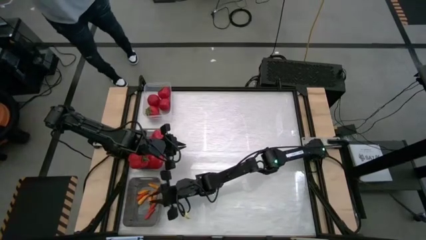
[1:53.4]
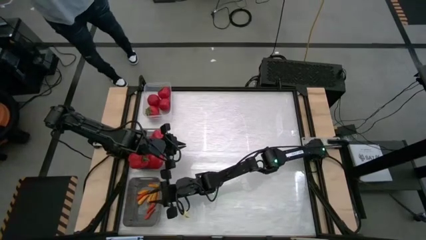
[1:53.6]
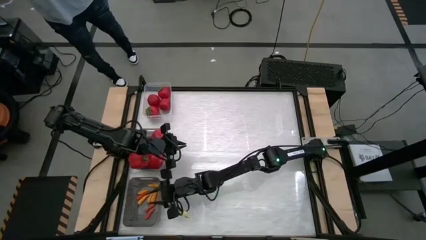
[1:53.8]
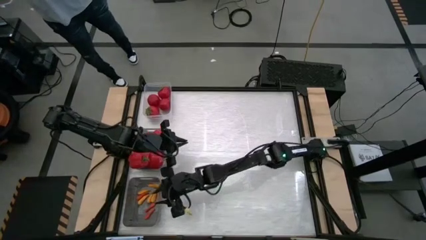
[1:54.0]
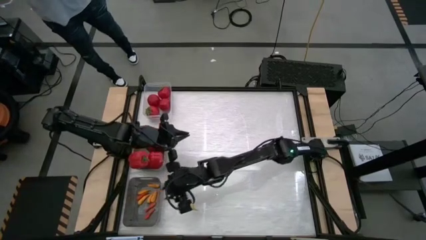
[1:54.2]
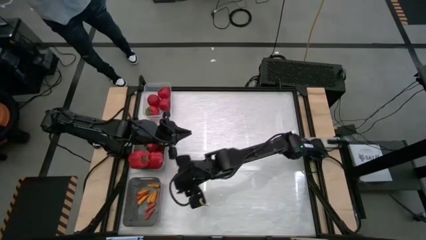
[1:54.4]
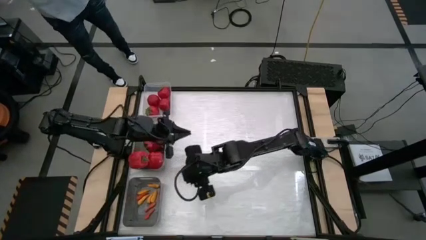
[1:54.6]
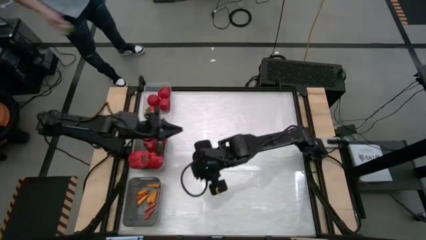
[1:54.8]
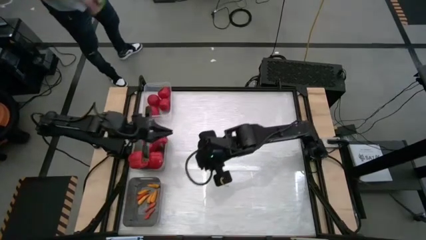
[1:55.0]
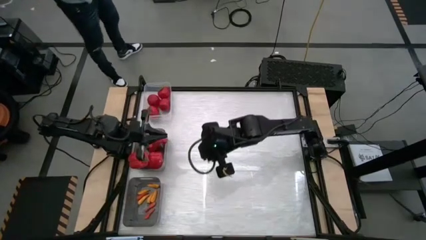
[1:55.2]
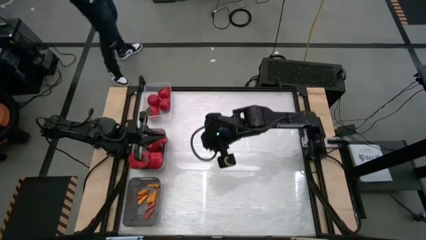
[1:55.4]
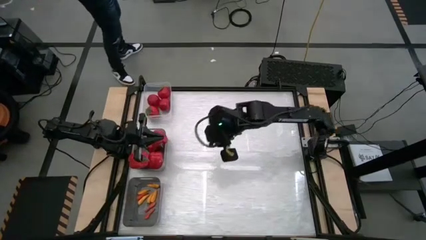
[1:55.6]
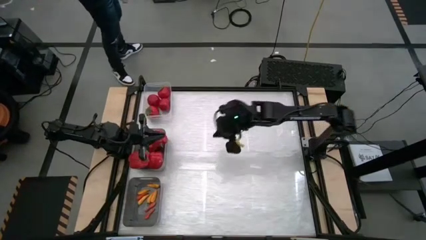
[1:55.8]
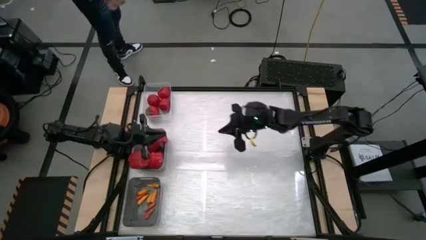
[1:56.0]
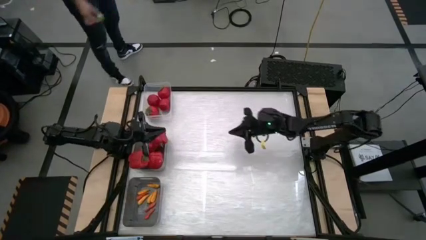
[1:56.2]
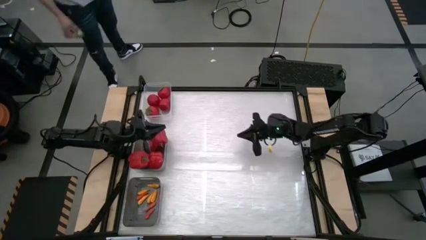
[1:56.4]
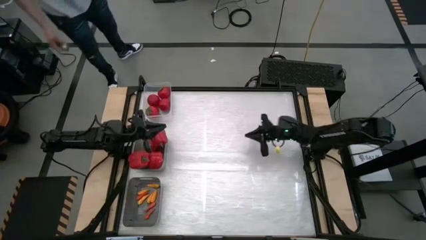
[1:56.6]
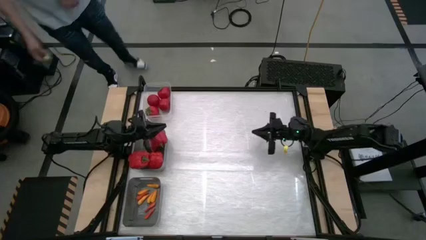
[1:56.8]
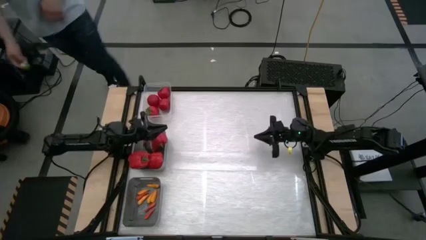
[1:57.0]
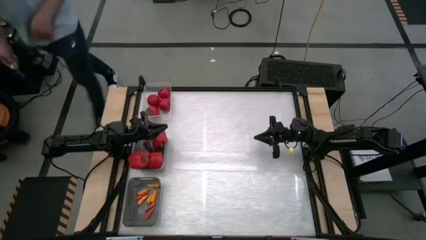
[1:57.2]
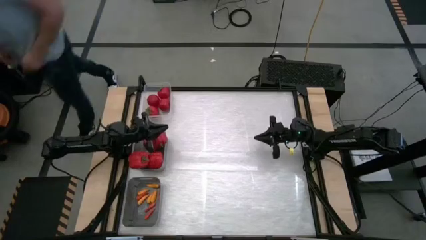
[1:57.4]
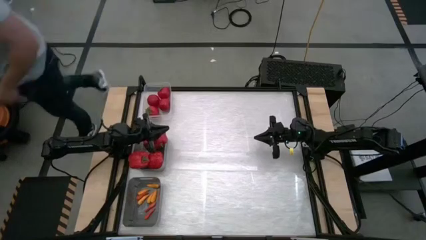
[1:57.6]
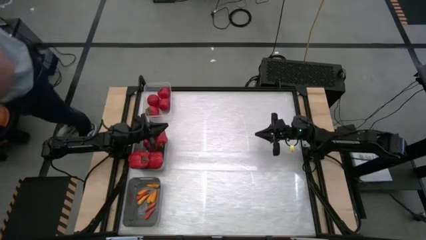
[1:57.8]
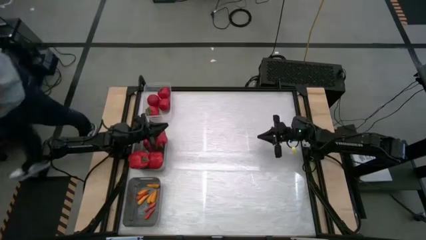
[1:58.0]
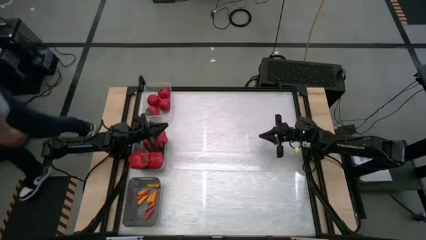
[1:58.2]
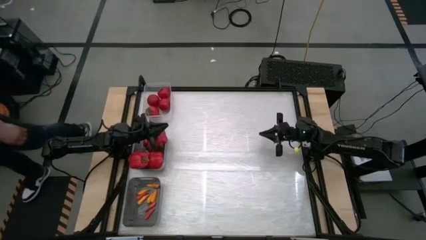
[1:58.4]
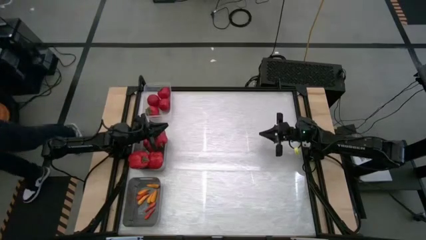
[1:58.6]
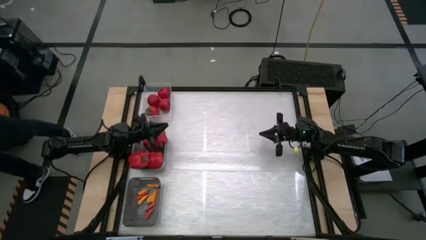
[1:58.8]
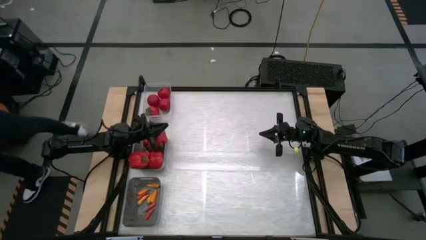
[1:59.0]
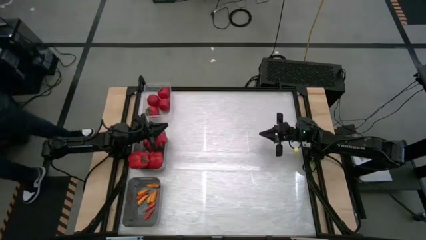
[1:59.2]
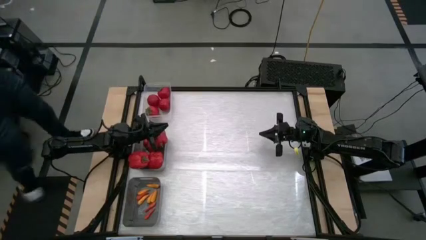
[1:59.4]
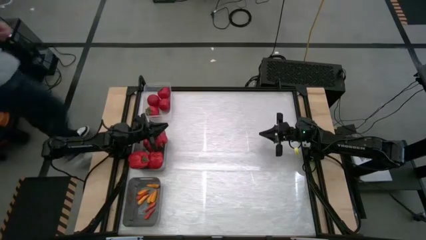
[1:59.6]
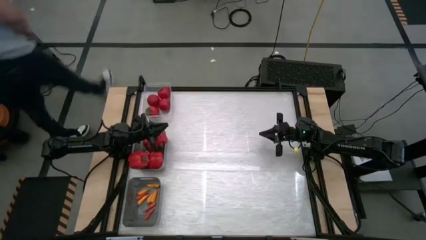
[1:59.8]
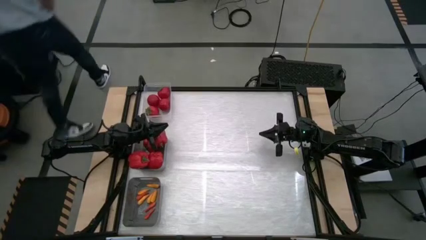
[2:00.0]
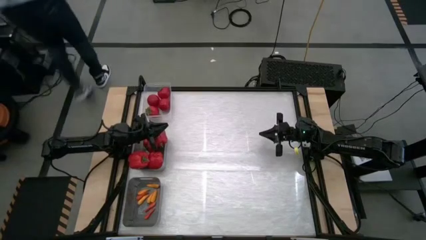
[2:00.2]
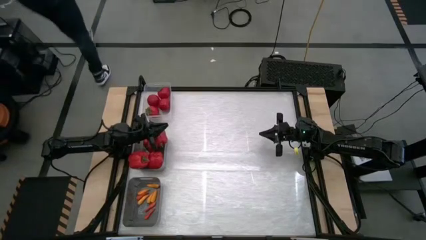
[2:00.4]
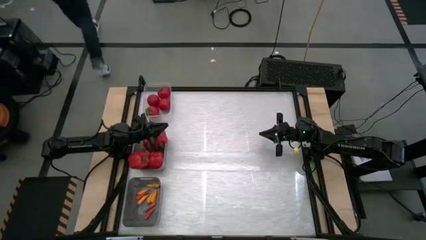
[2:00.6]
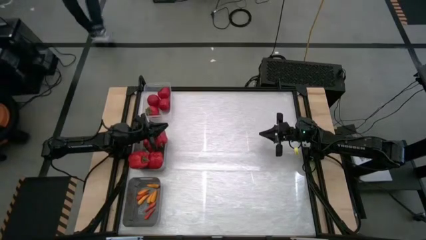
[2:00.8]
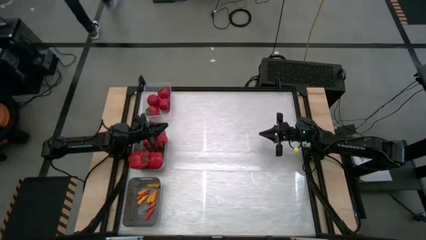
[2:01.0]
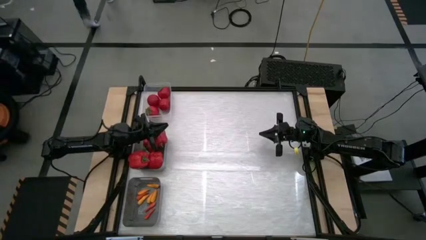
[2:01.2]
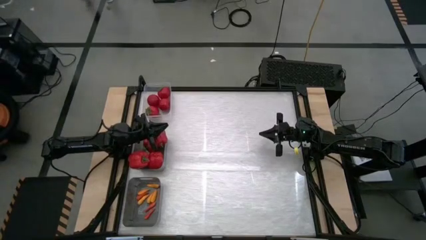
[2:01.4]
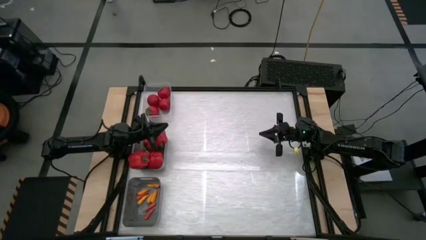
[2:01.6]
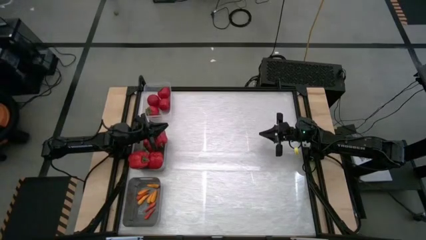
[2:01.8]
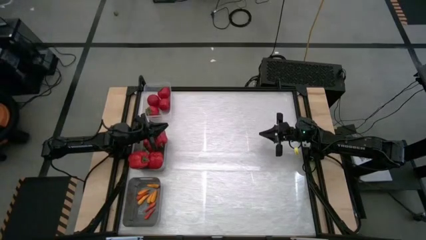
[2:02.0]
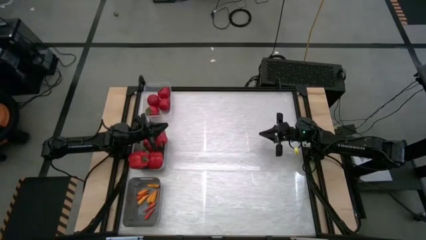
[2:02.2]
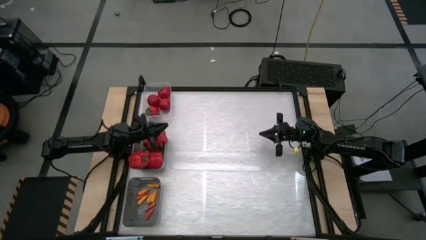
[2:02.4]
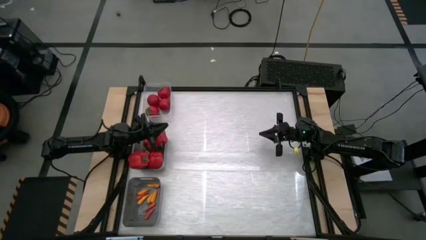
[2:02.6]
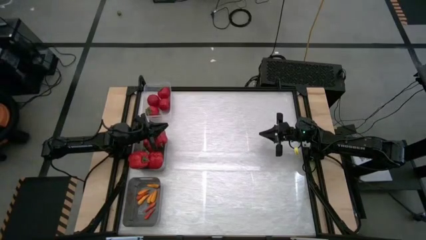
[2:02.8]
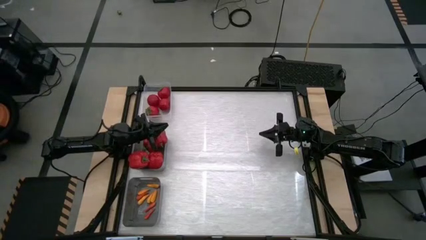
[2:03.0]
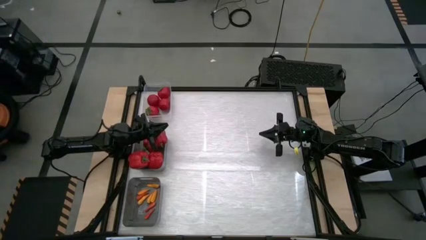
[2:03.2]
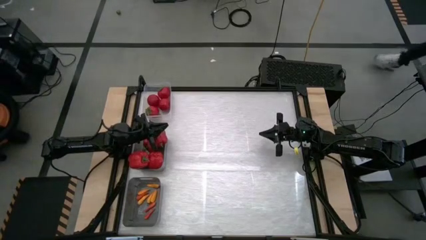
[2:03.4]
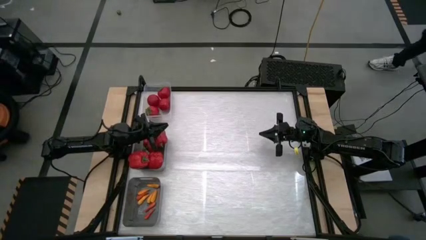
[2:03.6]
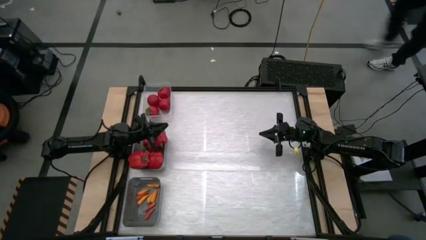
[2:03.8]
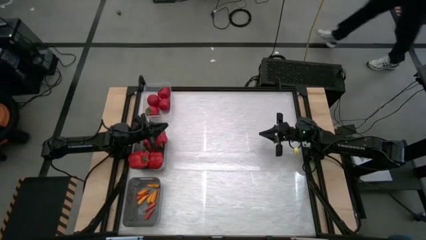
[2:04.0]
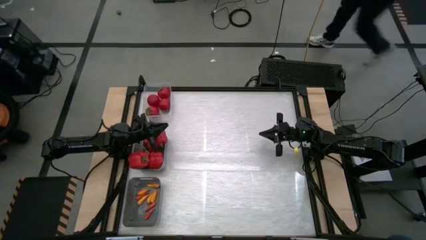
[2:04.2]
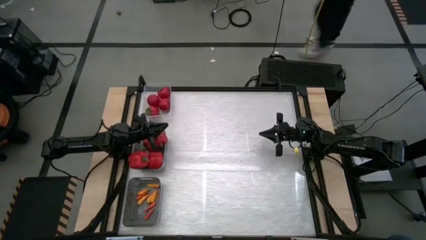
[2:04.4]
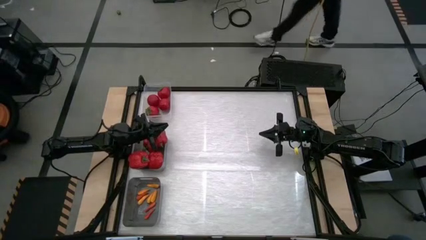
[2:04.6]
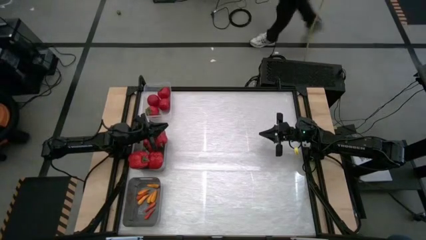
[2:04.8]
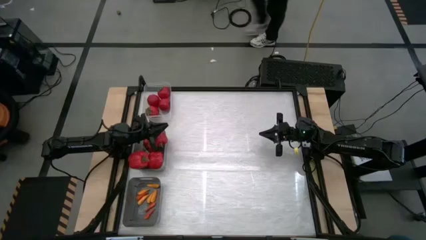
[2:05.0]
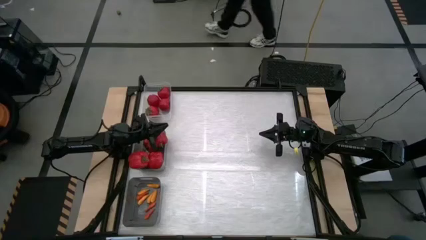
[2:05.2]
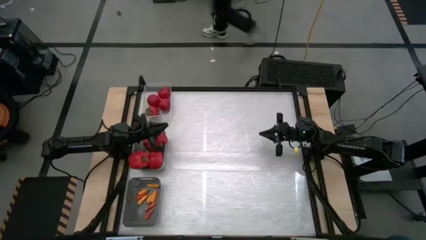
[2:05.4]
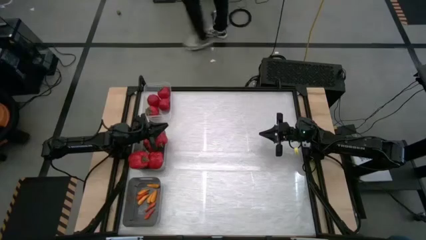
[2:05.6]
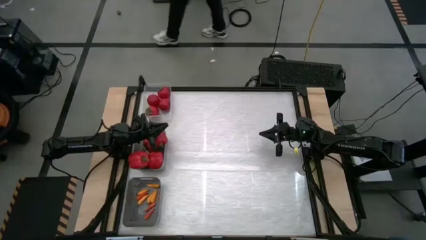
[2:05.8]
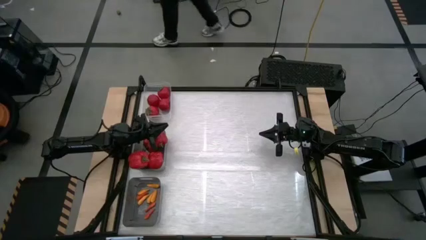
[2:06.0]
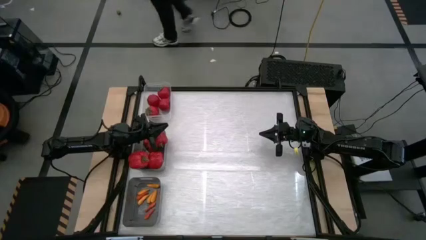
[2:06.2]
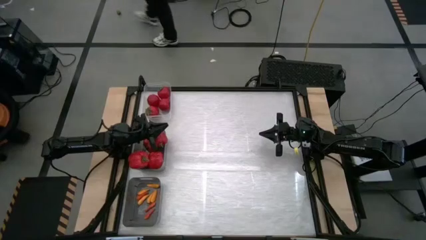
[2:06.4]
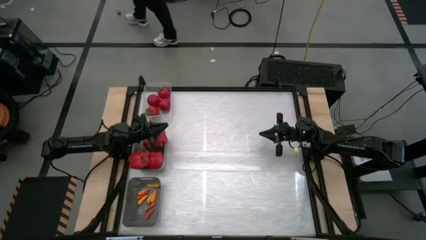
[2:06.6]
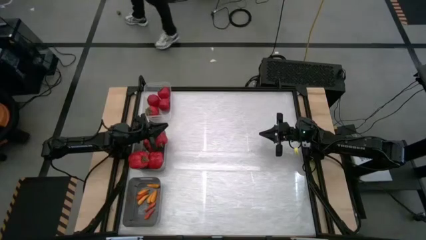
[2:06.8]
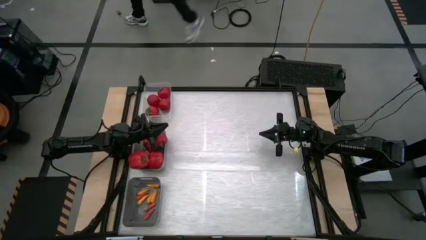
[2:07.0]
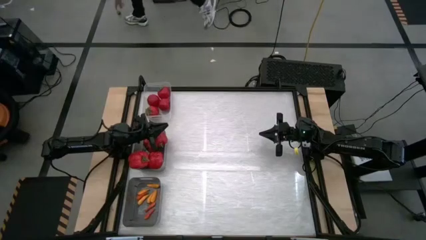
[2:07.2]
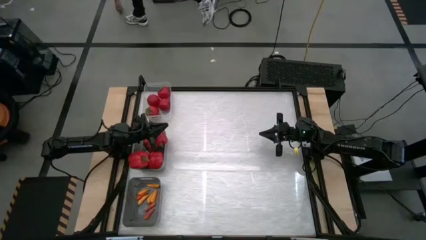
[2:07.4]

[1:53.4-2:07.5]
Task: Sort produce into baskets
Return to Home Position

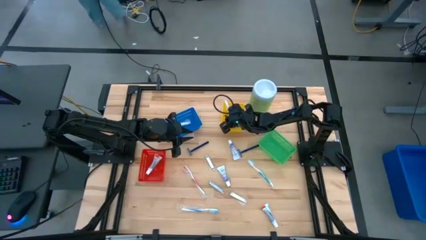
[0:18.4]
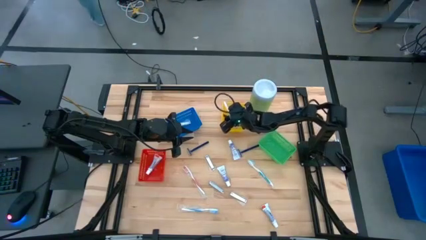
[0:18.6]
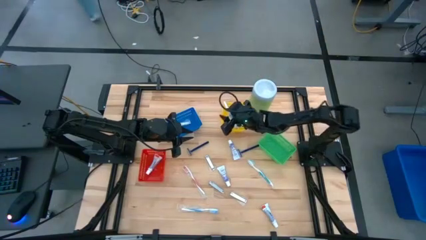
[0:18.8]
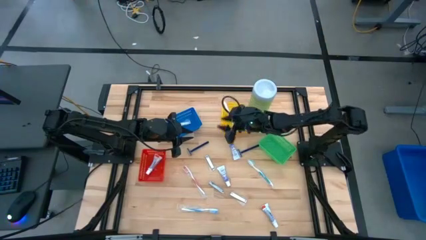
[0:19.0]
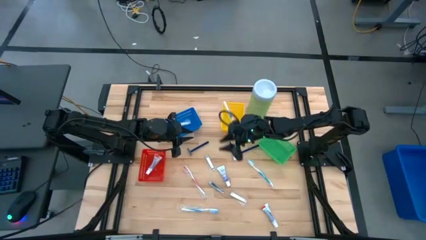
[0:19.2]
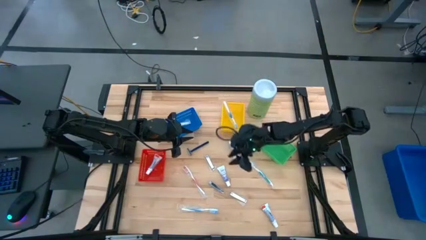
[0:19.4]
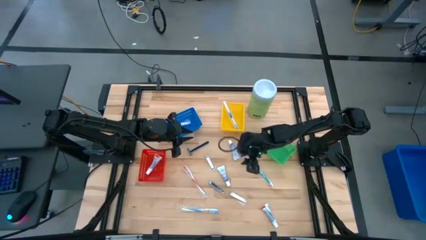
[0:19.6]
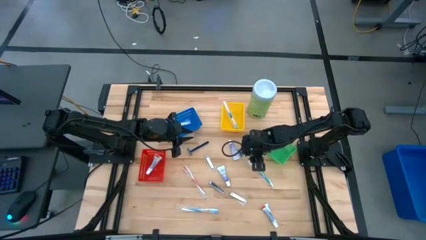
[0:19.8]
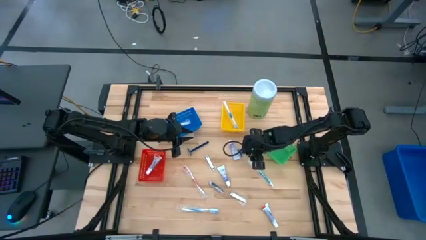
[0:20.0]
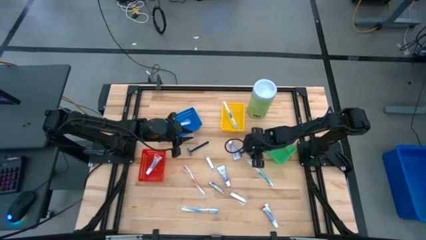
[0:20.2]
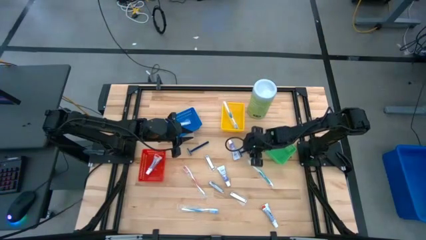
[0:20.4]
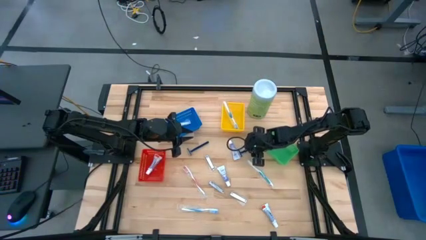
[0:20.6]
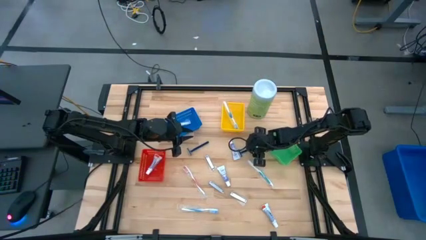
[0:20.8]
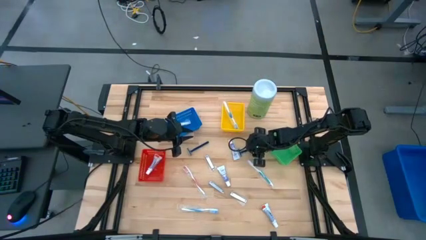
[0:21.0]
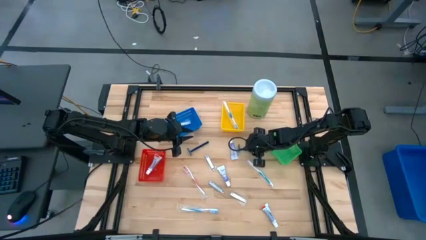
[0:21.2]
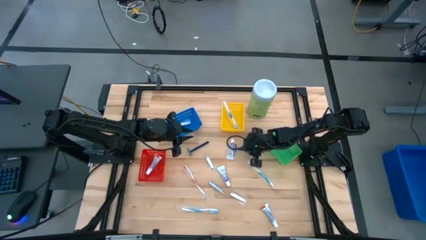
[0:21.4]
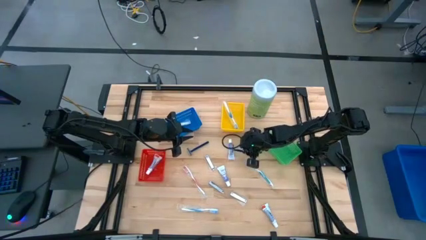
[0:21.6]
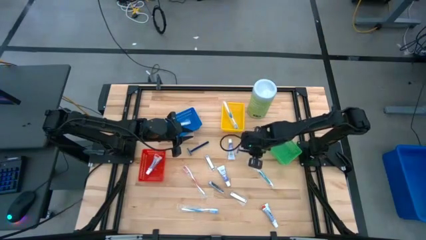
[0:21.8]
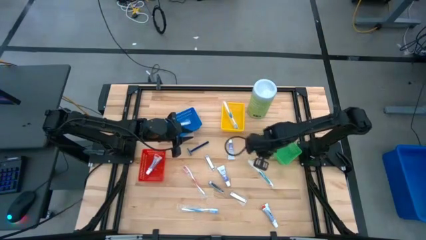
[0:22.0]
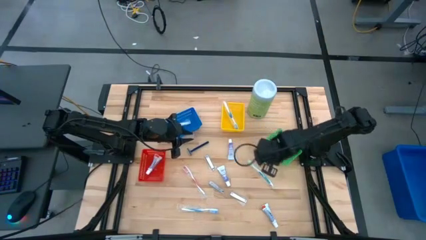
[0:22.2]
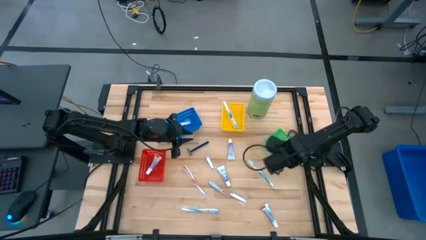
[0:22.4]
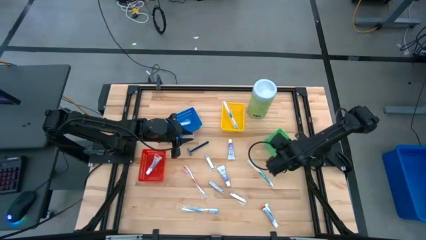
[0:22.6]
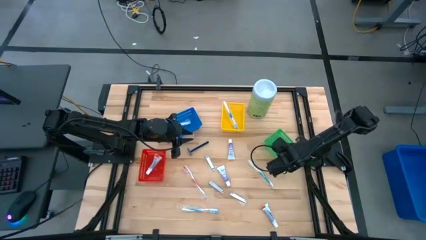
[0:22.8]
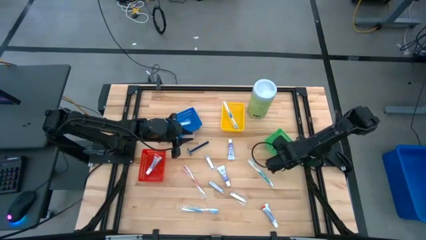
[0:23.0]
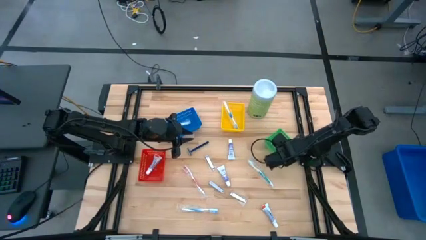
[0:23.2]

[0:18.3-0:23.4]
Task: Pick & Place Travel size toiletries
Put the blue razor into the green basket
